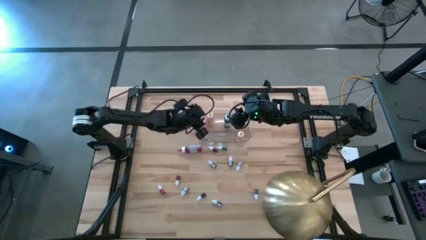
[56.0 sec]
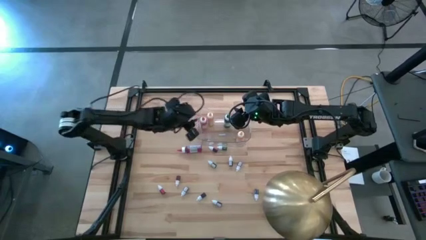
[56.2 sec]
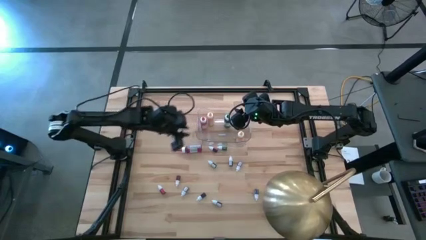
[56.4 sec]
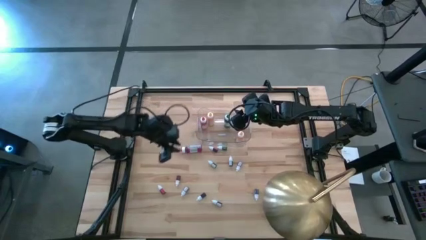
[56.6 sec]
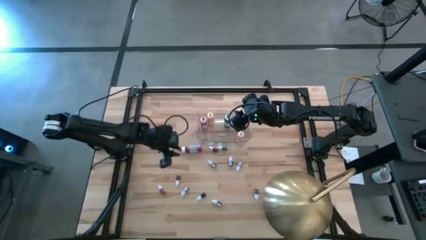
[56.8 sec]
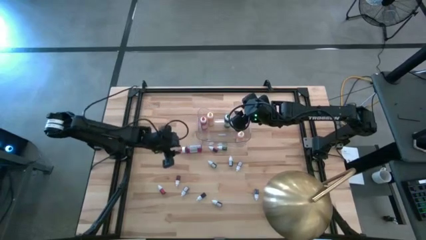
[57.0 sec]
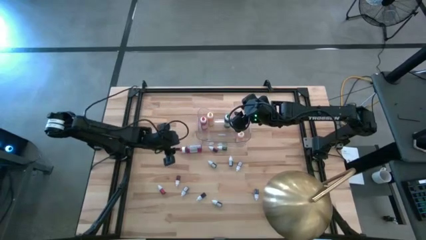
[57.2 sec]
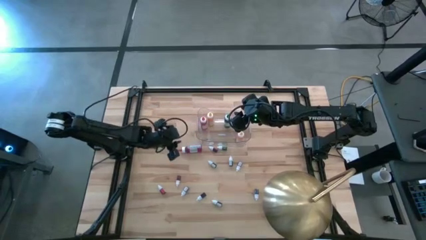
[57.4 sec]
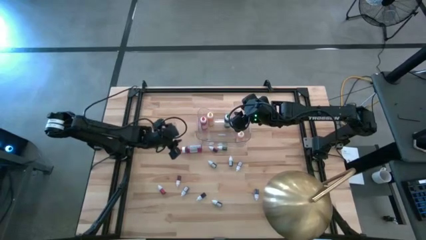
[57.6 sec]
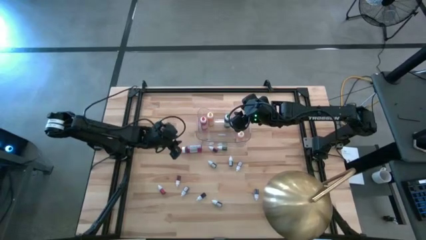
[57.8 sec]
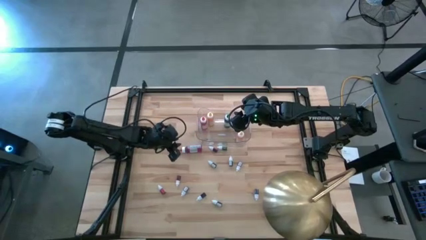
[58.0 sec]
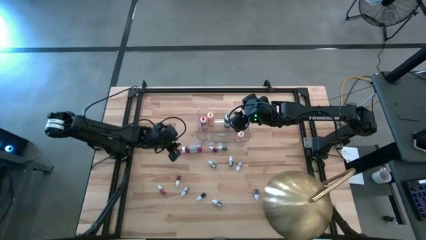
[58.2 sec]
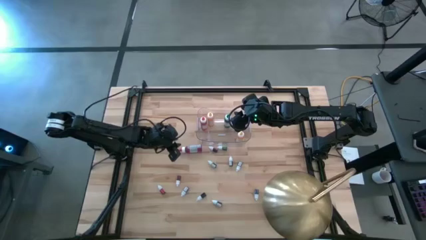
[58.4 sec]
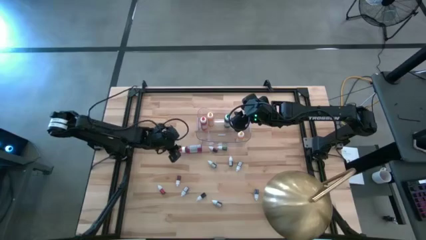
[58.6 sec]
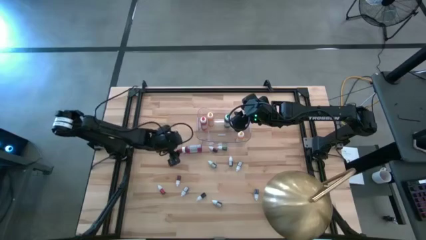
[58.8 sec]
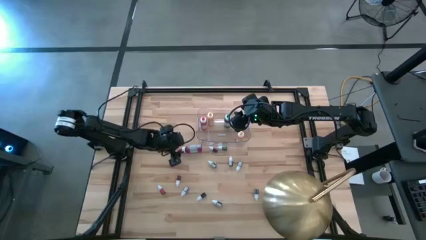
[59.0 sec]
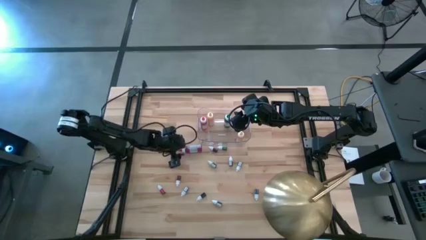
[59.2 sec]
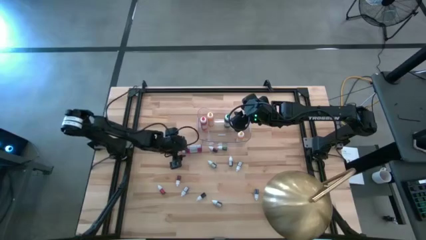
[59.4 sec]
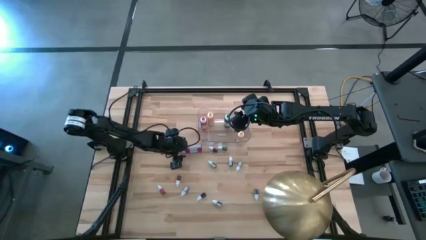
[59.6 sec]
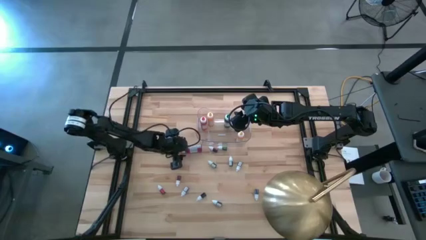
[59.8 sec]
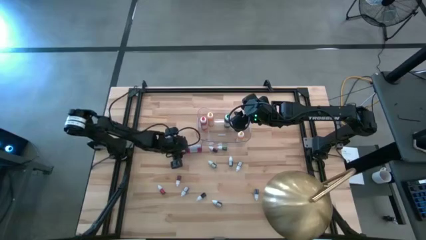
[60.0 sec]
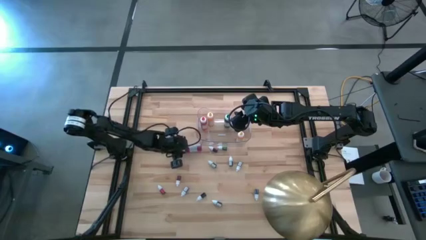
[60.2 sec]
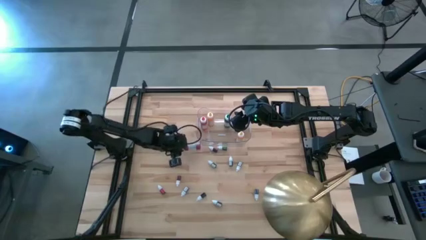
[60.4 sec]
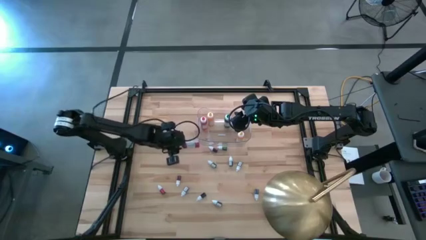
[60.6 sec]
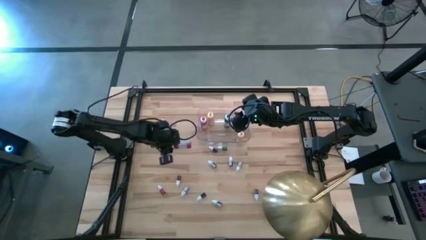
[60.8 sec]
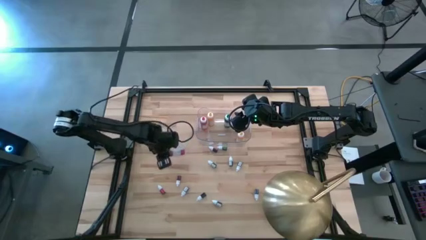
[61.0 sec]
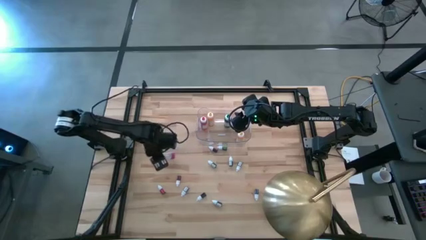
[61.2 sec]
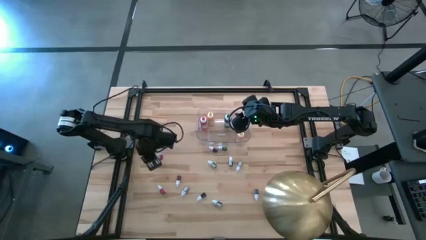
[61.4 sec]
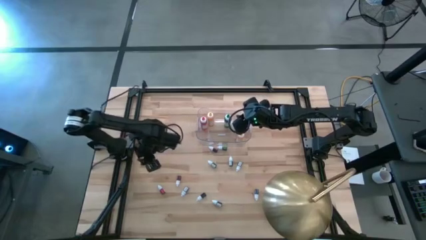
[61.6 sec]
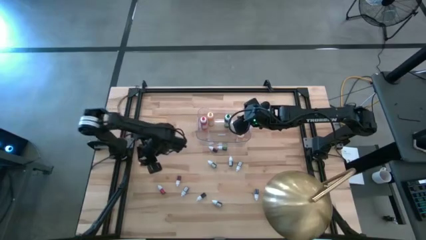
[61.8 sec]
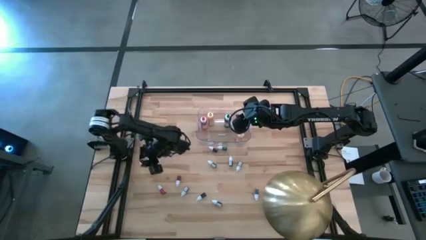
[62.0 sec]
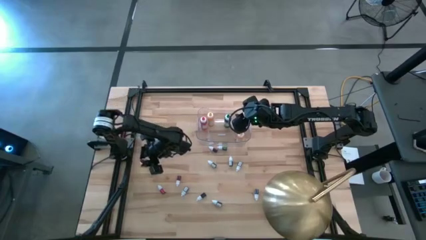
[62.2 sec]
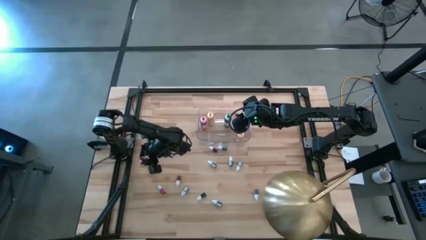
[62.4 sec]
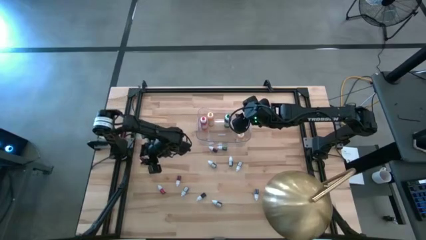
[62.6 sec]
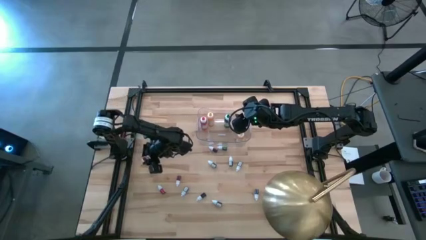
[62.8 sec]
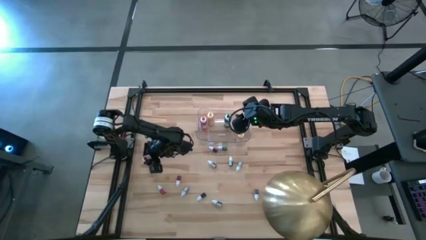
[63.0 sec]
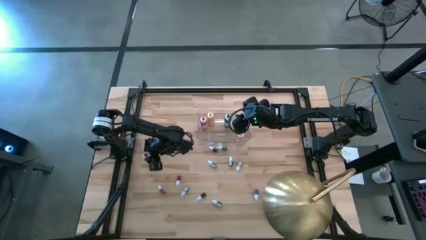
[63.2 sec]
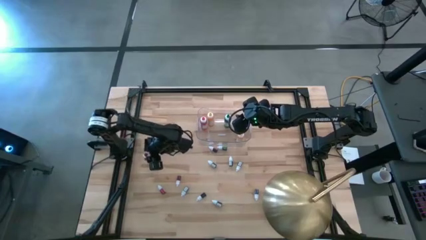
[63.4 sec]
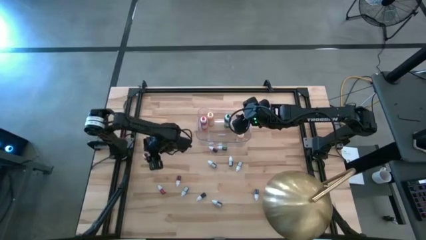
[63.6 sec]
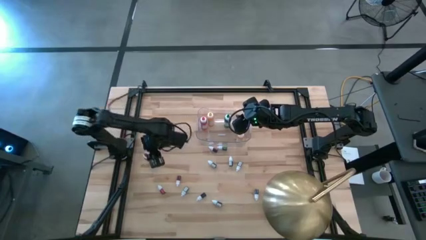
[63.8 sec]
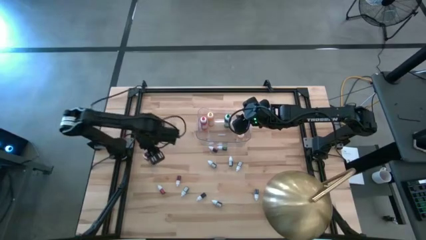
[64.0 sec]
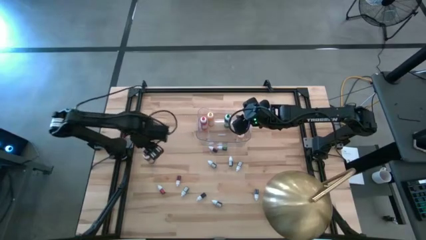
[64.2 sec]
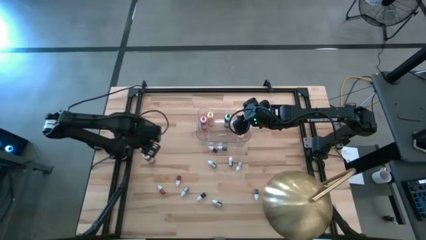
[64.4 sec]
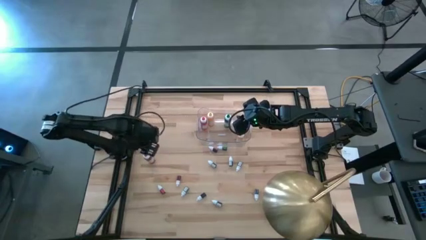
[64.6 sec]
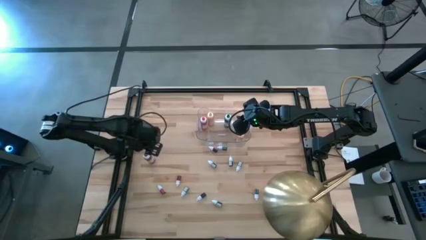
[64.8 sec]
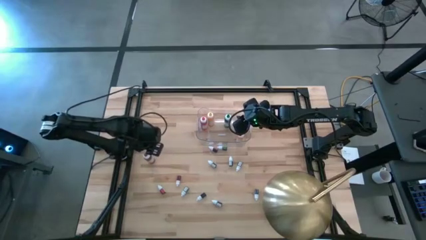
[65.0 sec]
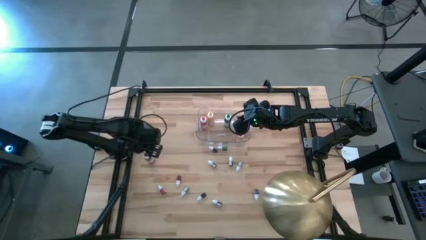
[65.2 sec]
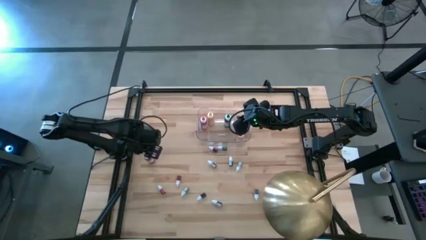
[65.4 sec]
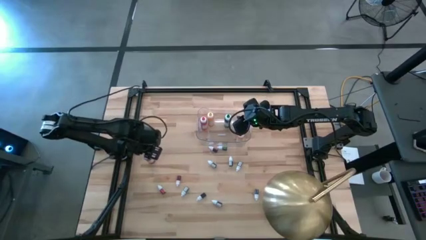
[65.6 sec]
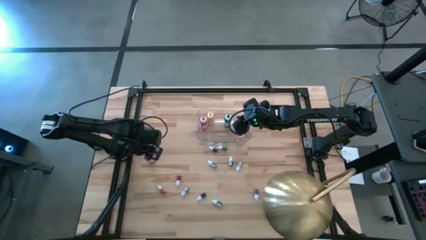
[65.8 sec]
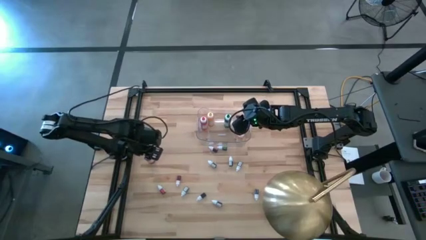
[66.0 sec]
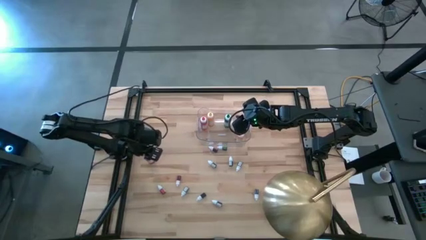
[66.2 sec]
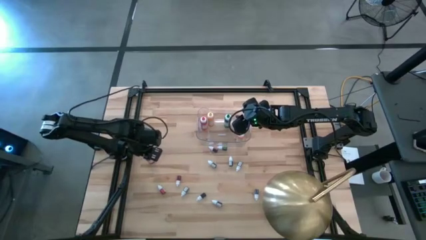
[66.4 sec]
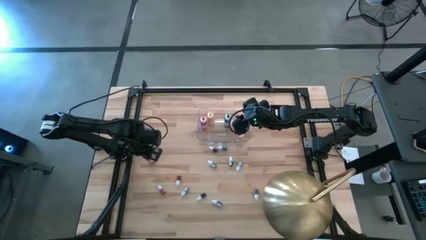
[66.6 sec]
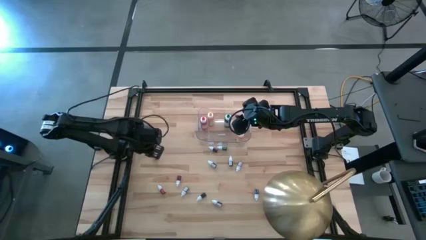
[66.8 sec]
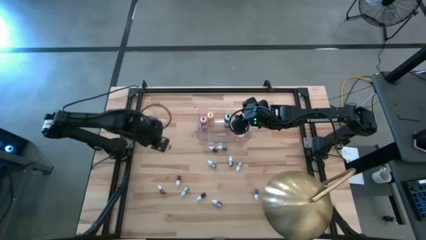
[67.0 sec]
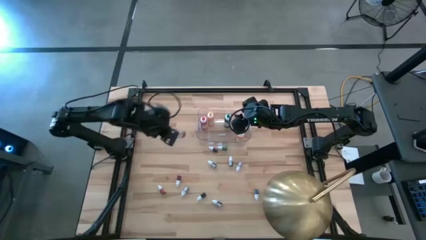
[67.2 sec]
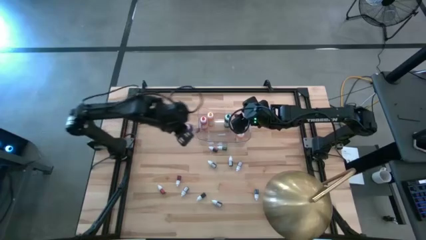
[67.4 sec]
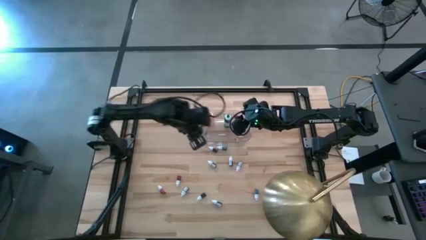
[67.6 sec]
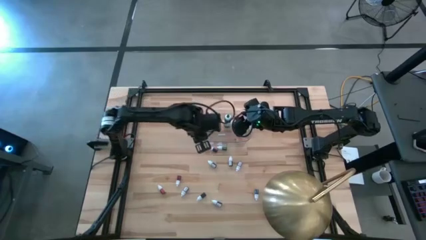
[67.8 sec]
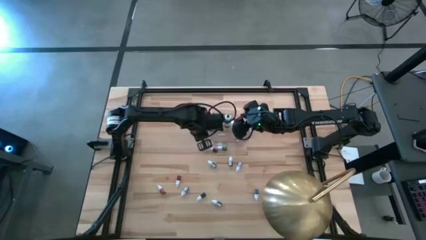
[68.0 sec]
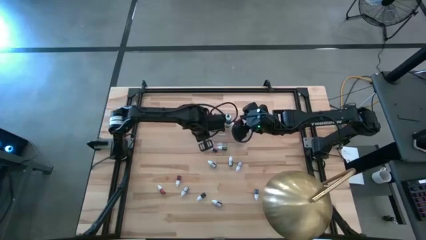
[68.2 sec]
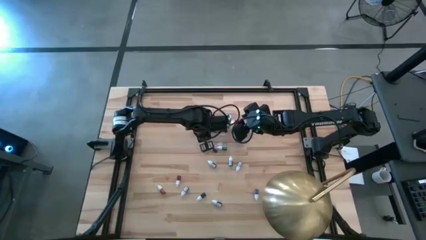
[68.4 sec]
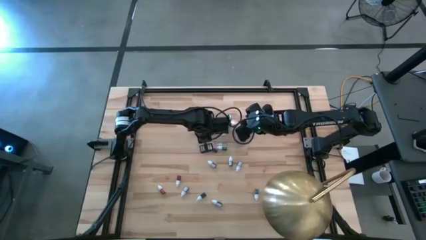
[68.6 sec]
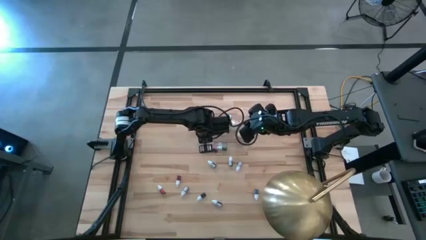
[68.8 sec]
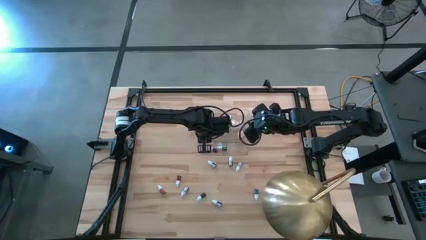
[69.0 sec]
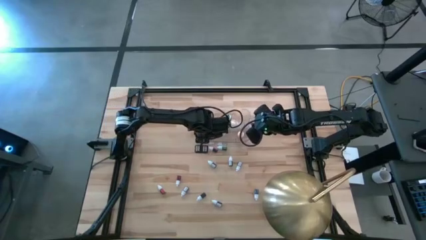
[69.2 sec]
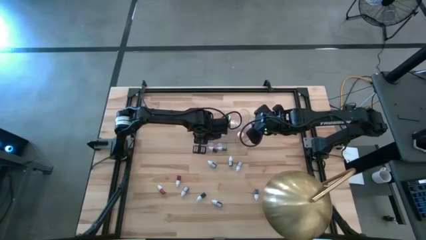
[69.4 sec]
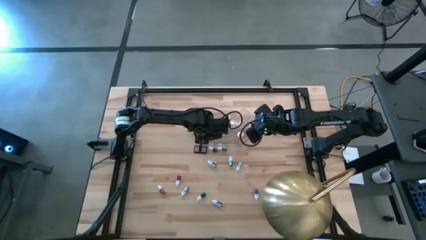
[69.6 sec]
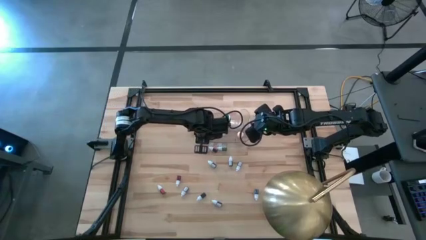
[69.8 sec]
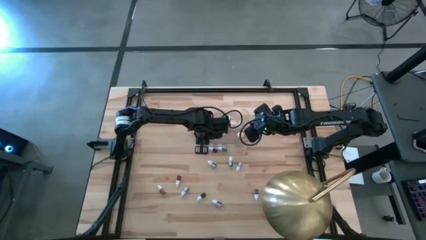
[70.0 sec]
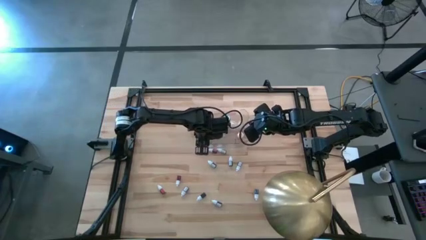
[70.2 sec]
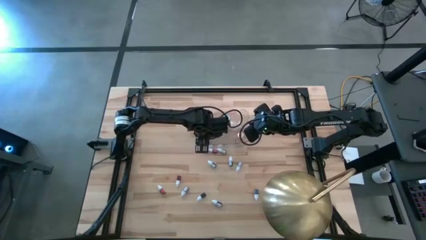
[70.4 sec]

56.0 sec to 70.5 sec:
Task: Pick & Place food coloring
Put the large red food coloring bottle in the transparent bin

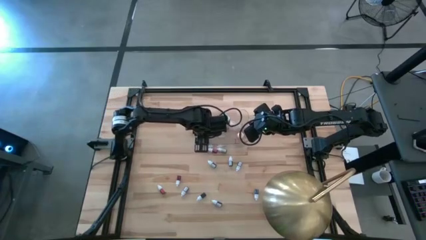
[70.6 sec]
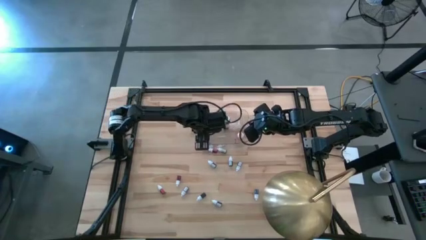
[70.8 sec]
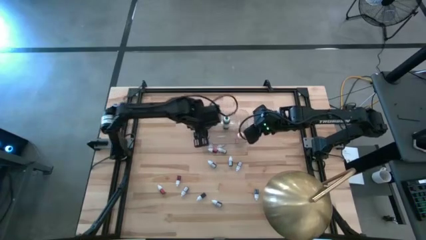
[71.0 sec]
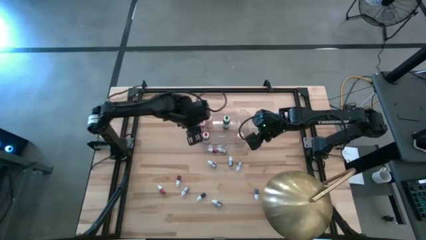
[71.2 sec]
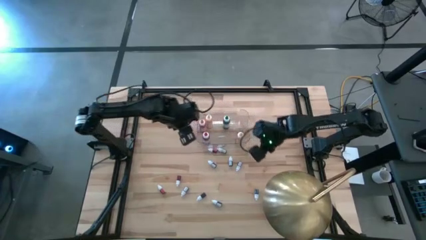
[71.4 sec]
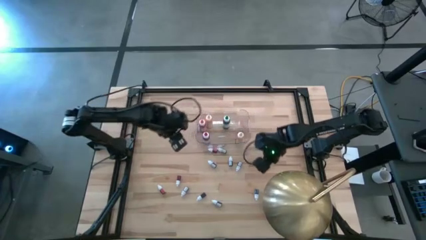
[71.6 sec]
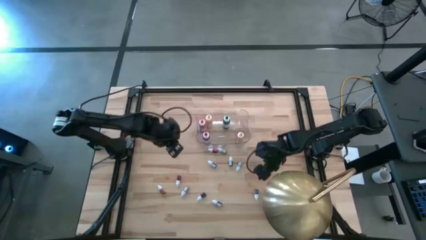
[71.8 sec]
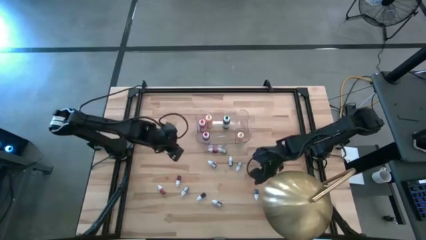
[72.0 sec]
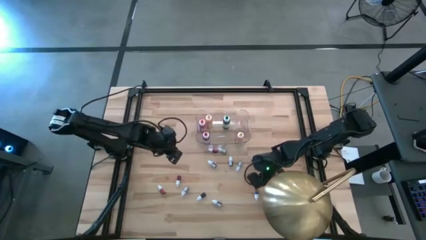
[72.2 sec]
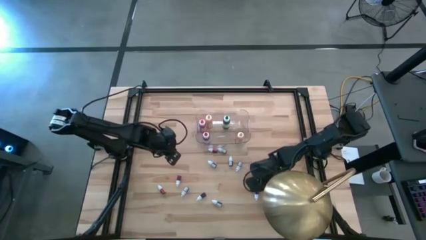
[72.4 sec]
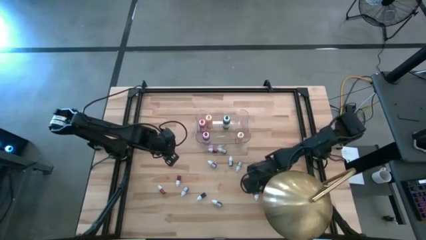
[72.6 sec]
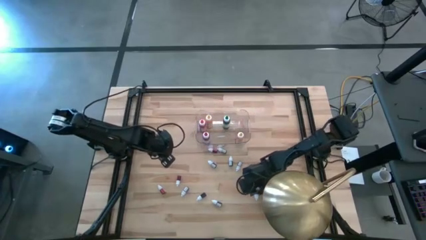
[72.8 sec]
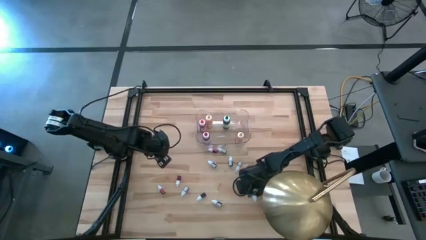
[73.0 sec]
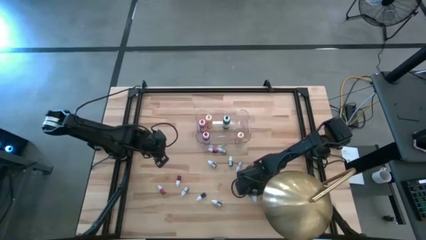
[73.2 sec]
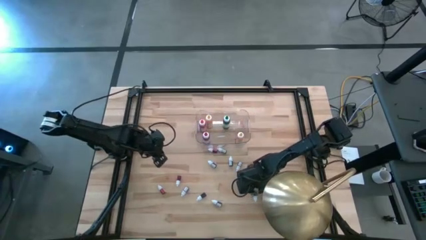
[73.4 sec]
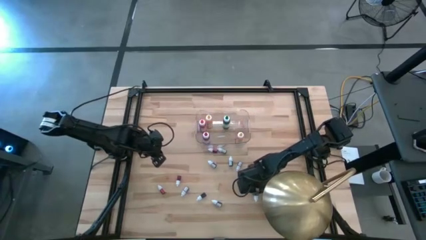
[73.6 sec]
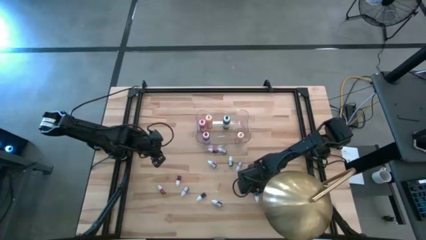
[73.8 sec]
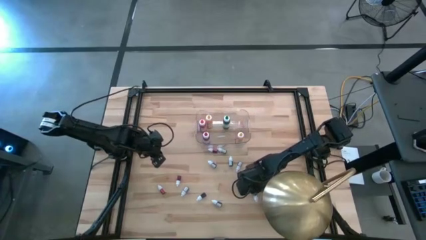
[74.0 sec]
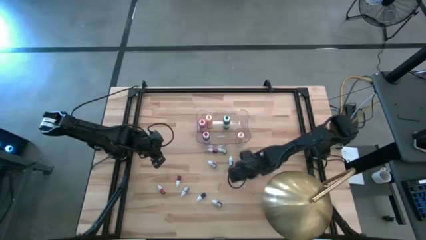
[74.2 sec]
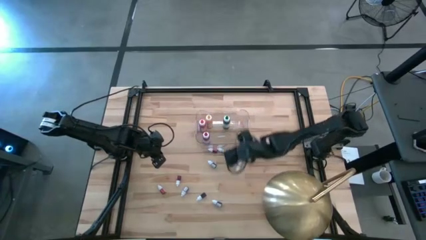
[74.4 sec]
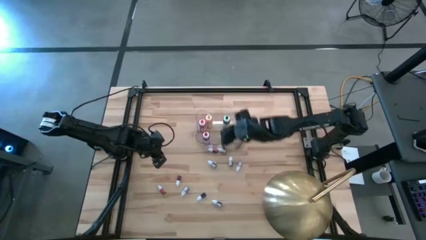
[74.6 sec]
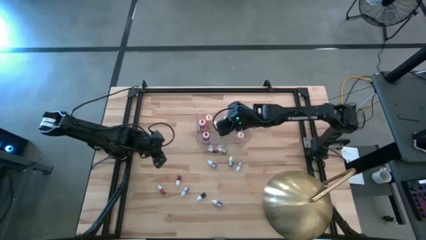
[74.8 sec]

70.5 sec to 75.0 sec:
Put the right small blue food coloring bottle in the transparent bin
